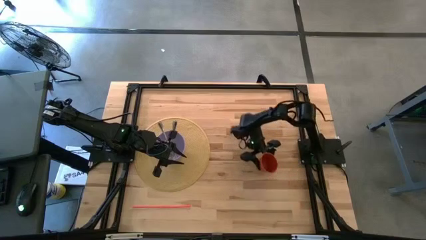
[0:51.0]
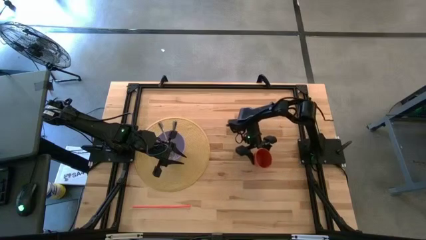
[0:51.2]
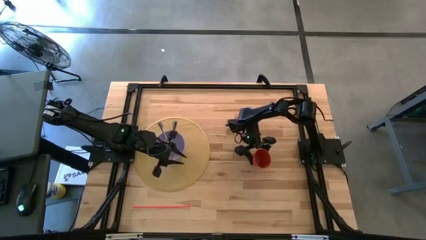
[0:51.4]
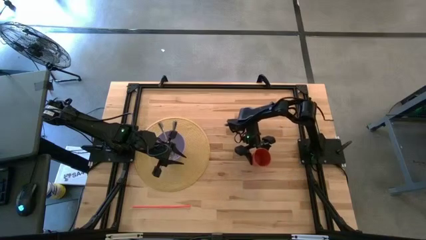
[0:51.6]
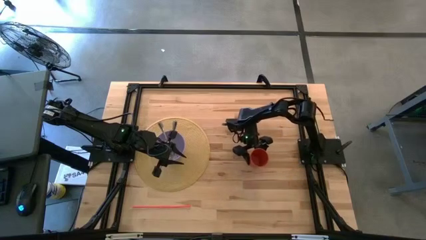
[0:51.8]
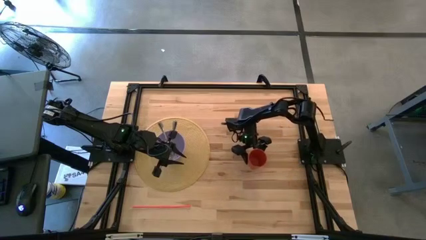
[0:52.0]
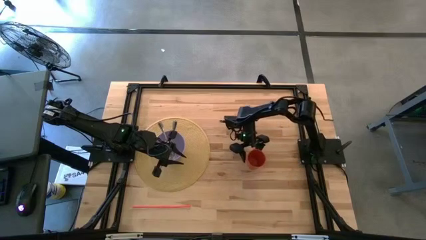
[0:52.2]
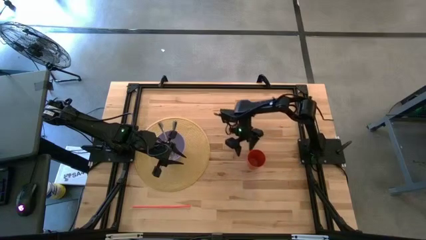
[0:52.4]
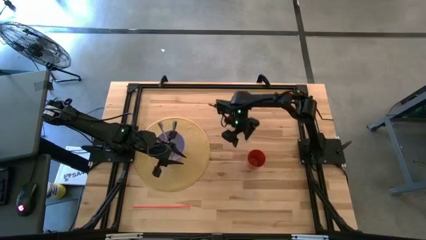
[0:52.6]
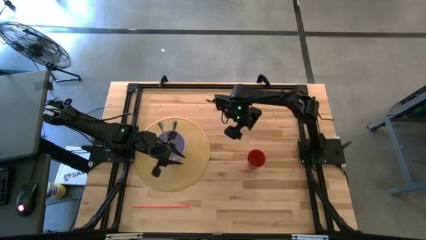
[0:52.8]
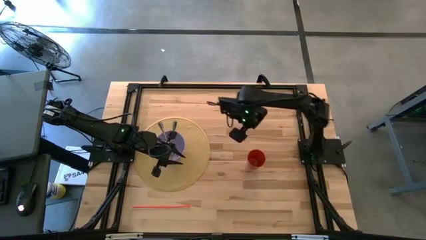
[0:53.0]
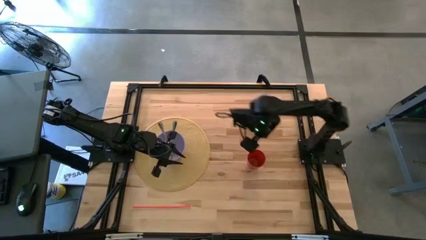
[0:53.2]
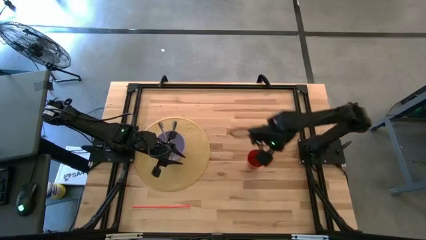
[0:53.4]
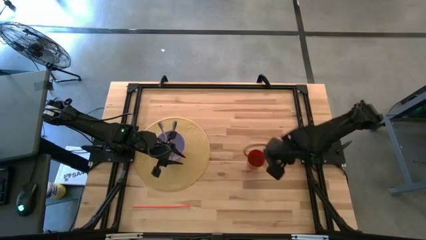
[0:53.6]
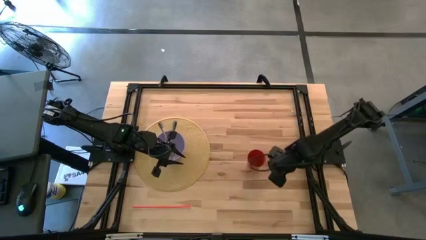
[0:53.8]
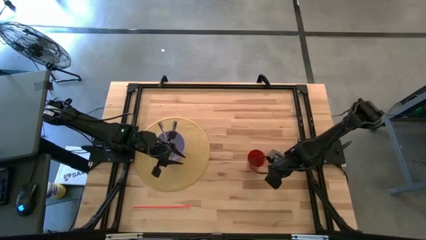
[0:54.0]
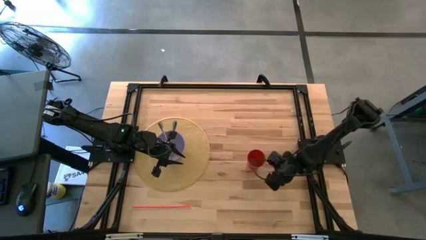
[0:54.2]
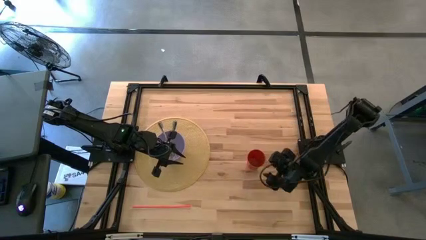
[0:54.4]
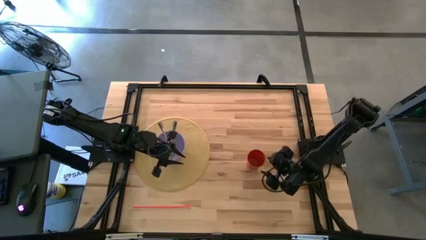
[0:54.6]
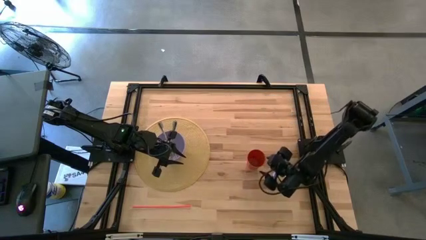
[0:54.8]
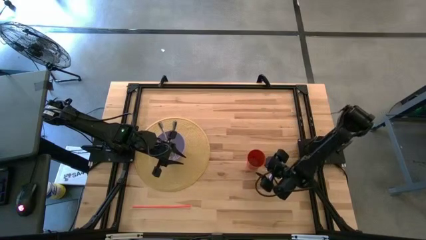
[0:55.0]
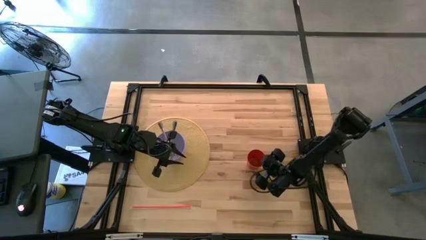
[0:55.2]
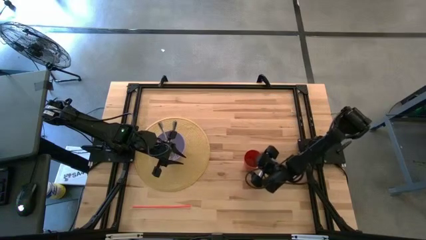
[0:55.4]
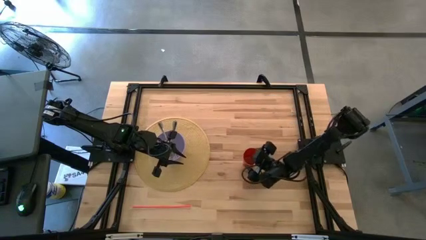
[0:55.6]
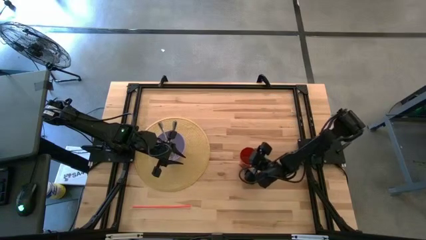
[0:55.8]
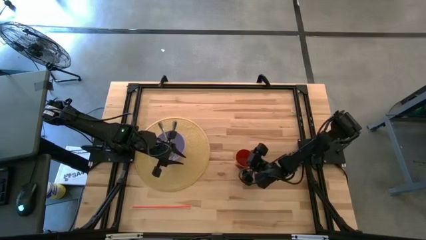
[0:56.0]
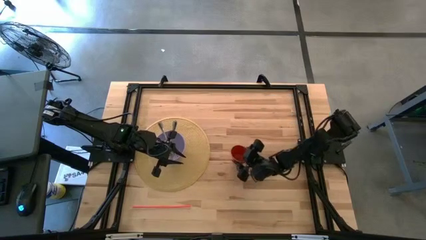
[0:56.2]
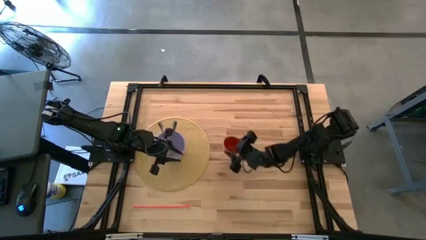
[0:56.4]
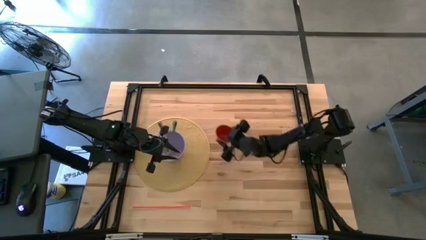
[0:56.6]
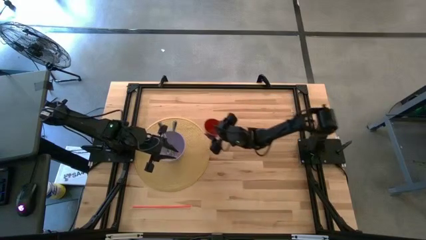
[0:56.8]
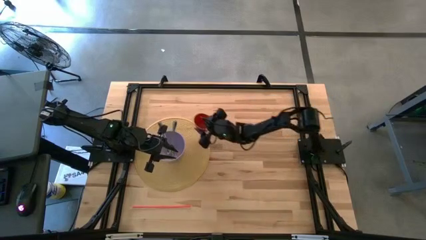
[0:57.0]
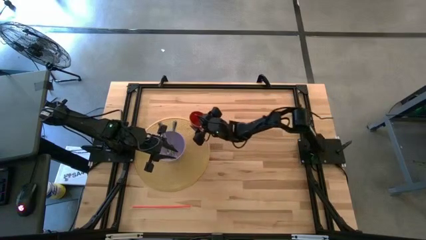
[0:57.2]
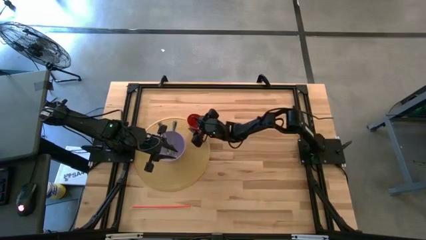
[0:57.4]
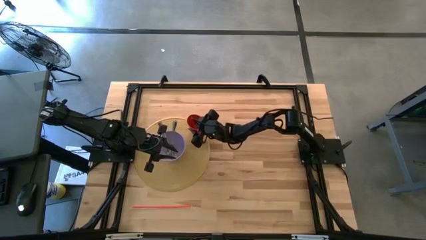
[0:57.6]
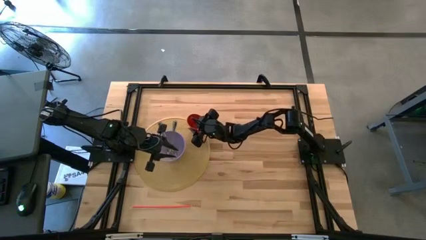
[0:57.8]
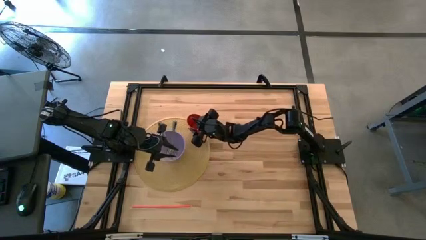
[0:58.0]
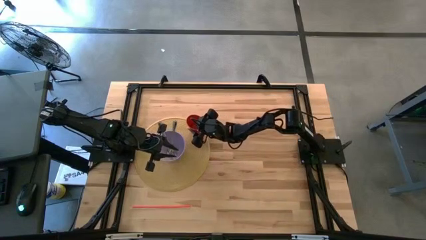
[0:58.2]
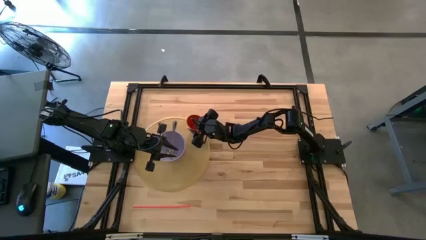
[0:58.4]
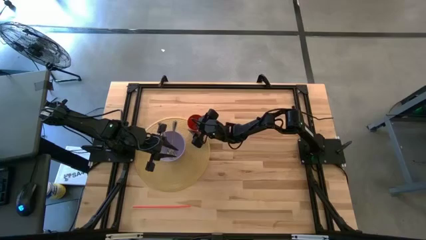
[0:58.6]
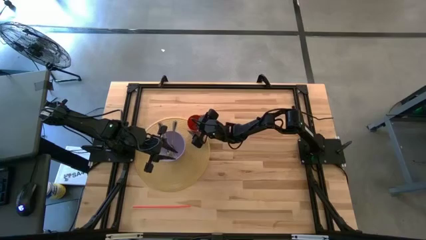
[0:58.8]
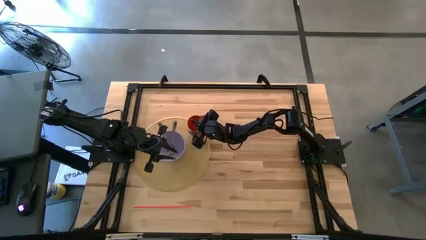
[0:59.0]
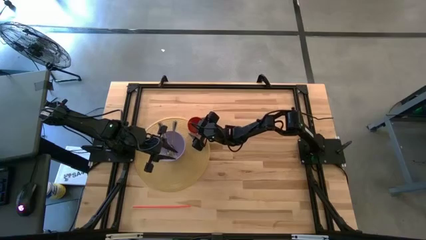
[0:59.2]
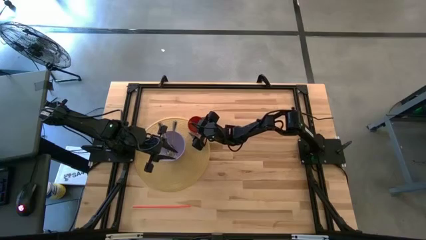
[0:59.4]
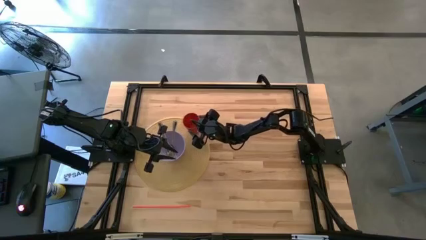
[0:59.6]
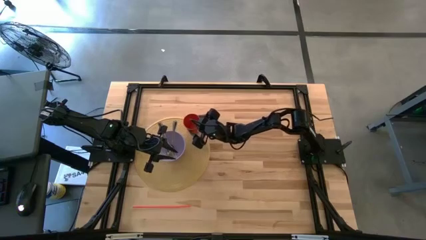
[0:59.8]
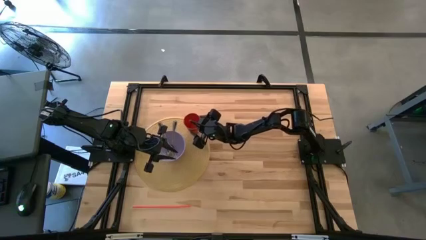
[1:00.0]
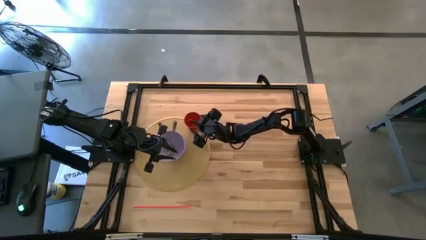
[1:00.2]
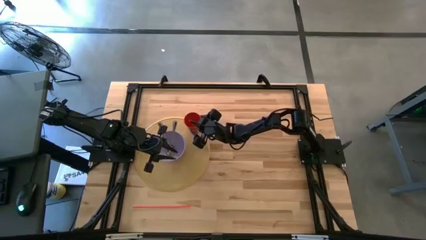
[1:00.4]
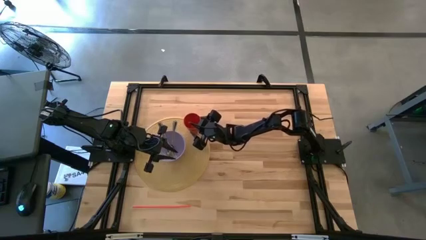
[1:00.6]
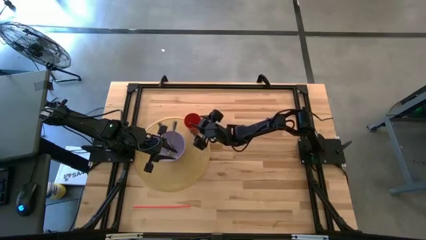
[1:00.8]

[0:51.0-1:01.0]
Task: Pick & Place Utensil
Put the orange cup on the brown placemat

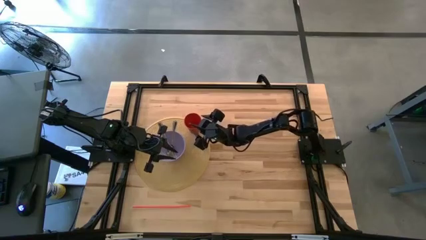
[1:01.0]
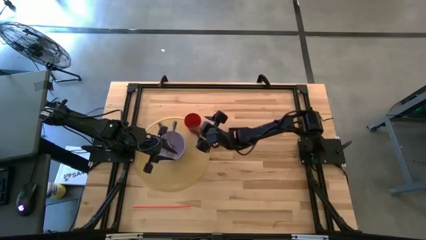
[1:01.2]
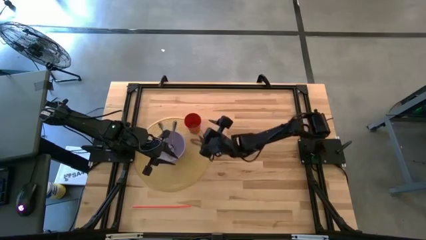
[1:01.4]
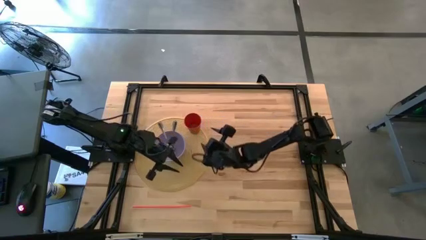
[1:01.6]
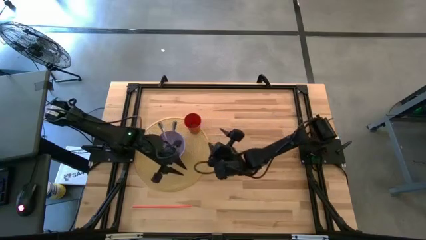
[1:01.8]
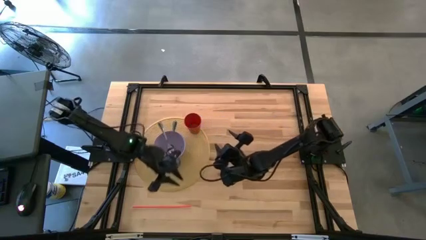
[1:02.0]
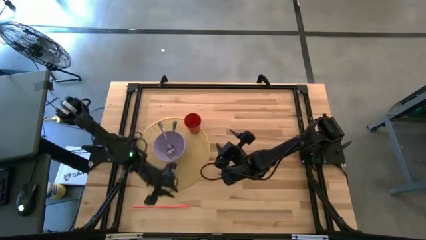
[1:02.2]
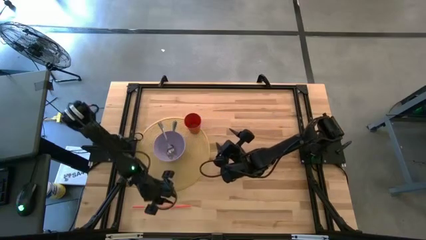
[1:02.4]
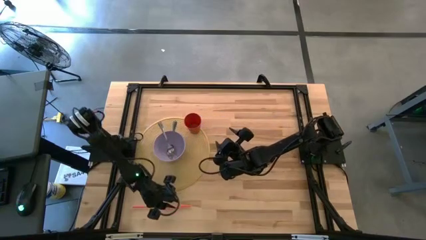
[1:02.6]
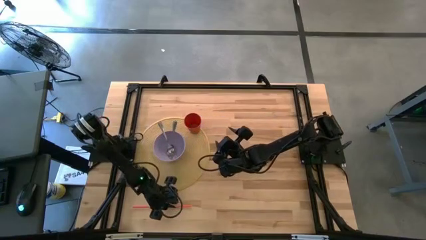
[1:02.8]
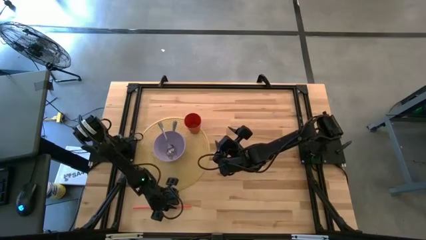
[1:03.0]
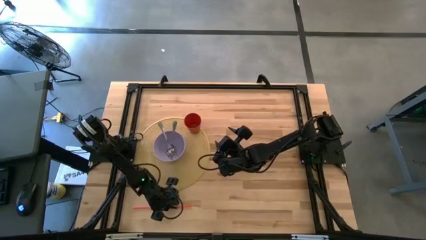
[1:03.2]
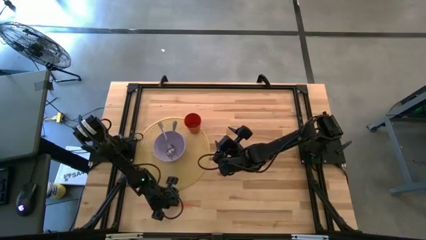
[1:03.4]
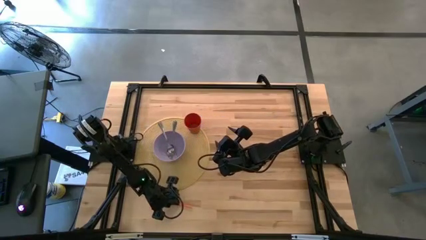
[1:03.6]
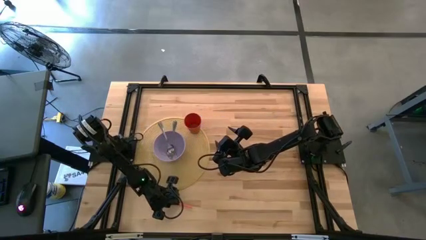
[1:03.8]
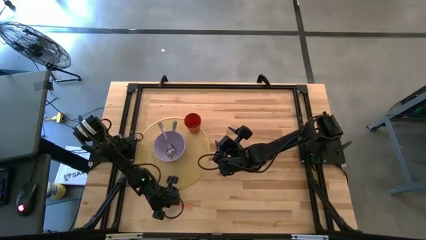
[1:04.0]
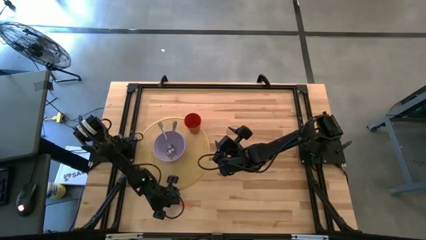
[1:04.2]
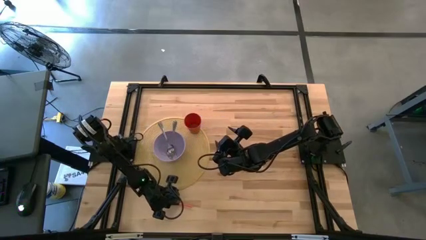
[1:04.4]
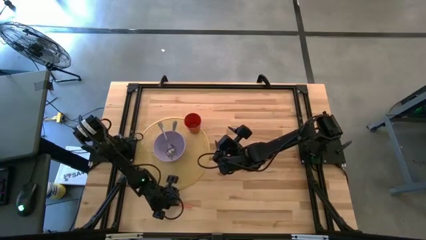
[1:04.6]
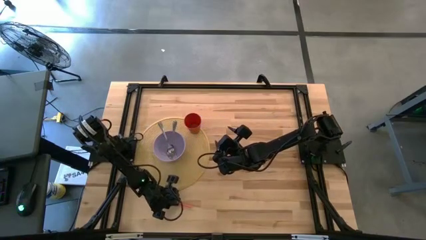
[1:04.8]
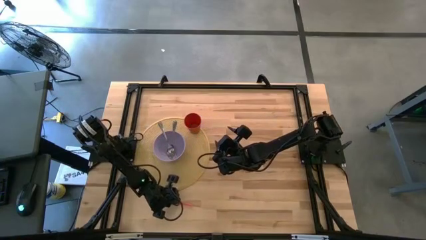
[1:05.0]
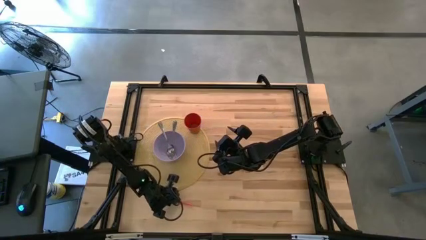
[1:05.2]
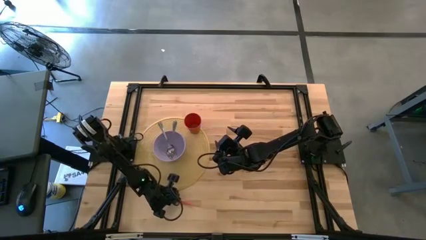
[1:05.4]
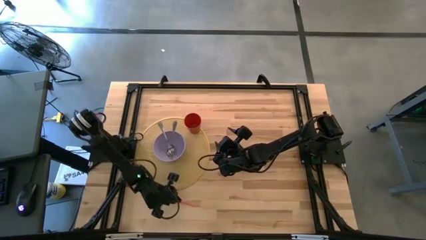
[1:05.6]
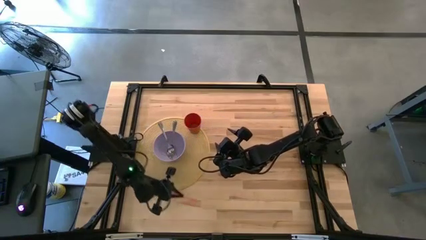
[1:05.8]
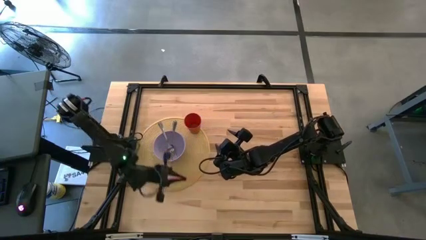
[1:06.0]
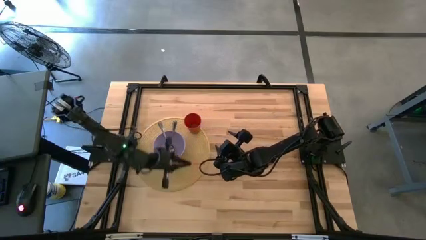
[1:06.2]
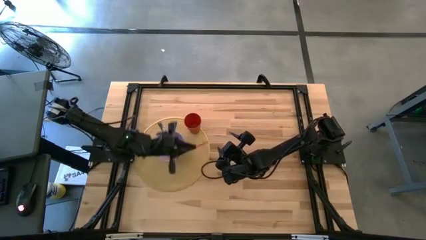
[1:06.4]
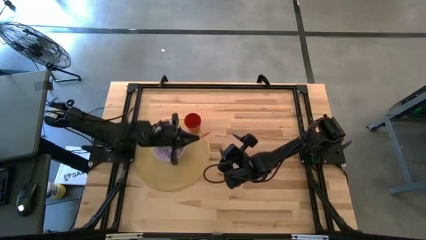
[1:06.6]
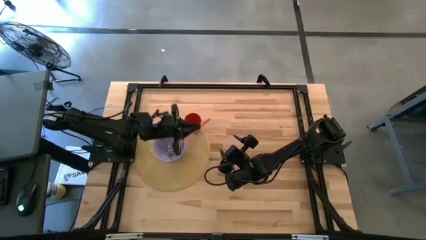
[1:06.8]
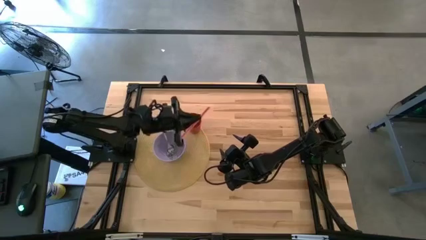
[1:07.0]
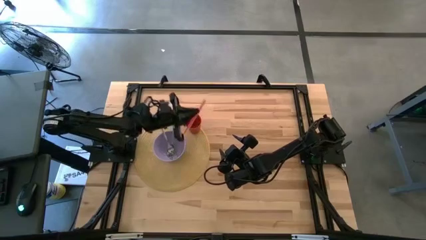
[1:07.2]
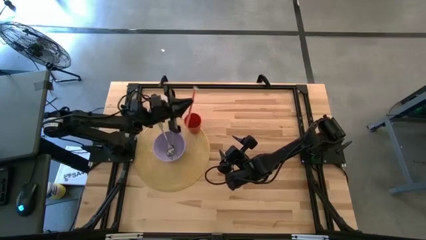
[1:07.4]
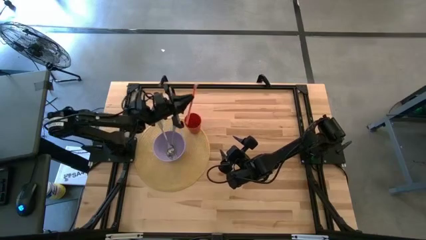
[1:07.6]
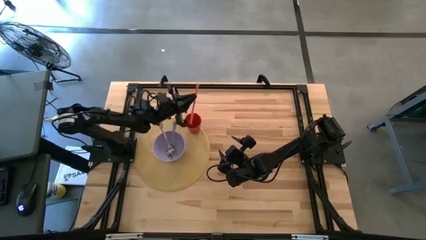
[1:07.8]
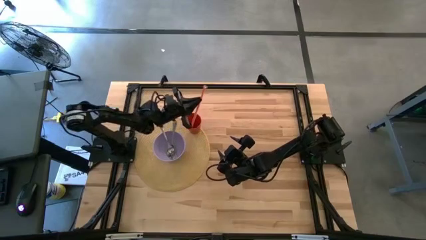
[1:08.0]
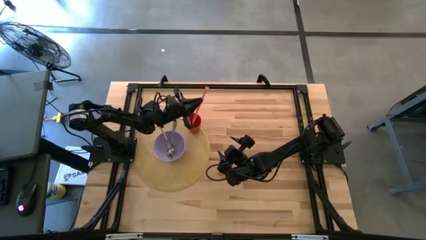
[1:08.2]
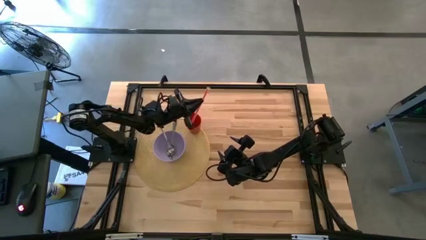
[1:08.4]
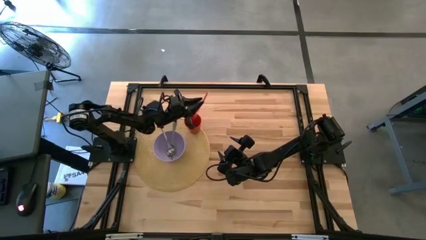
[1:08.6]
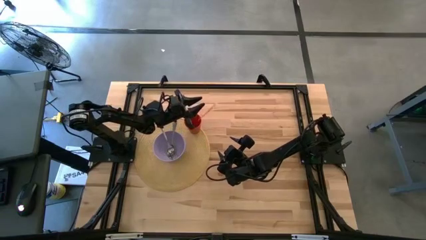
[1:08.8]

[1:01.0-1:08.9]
Put the orange straw in the orange cup
